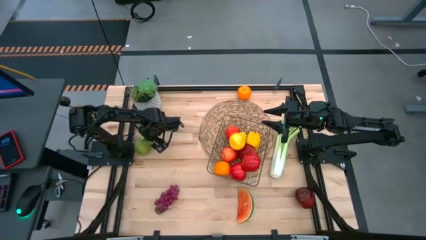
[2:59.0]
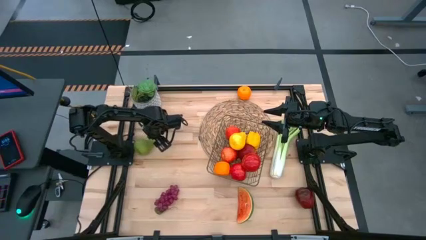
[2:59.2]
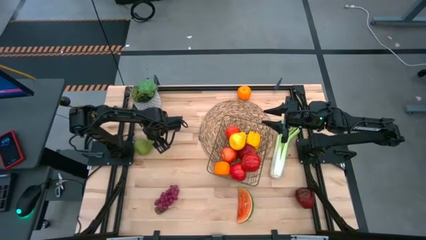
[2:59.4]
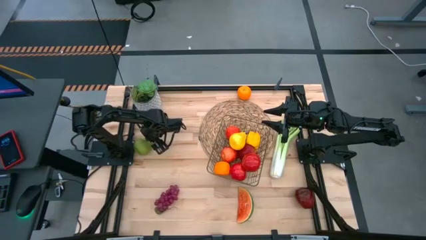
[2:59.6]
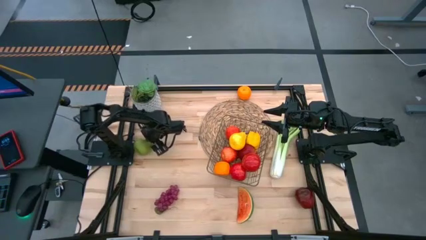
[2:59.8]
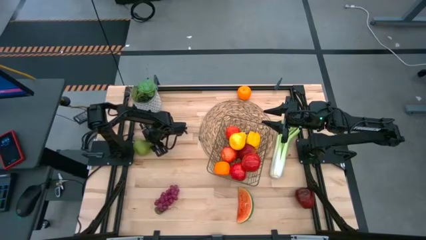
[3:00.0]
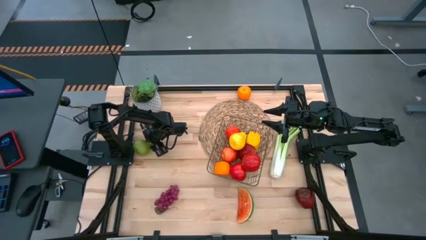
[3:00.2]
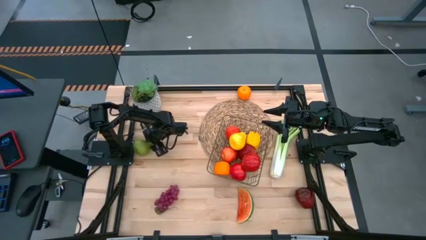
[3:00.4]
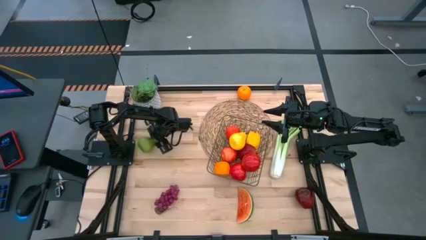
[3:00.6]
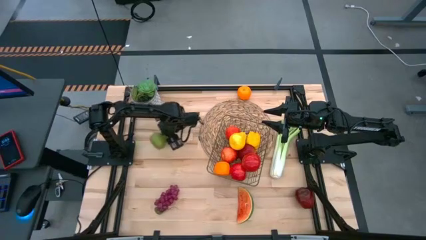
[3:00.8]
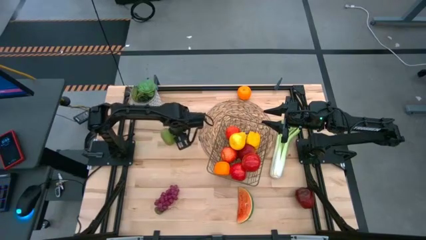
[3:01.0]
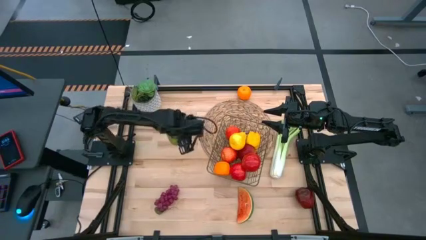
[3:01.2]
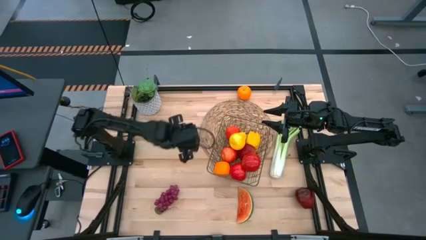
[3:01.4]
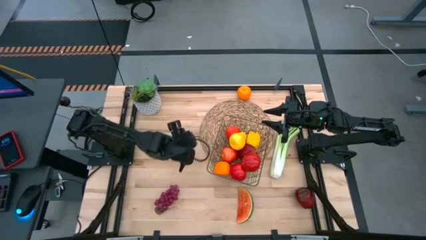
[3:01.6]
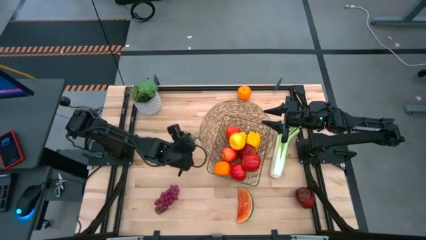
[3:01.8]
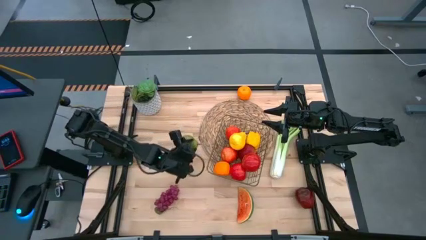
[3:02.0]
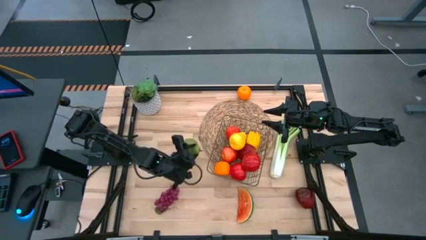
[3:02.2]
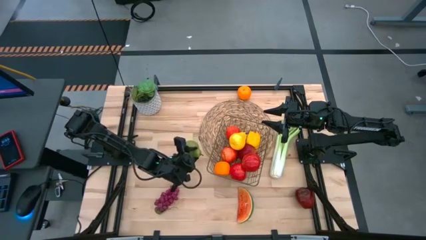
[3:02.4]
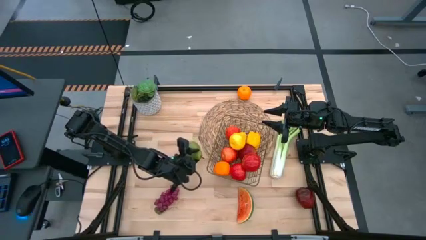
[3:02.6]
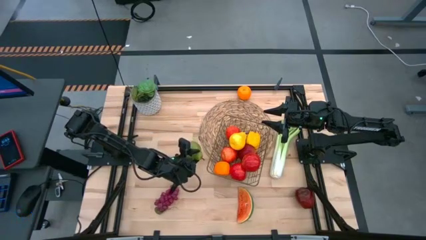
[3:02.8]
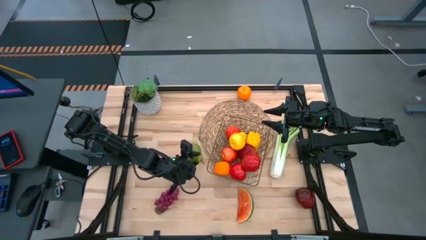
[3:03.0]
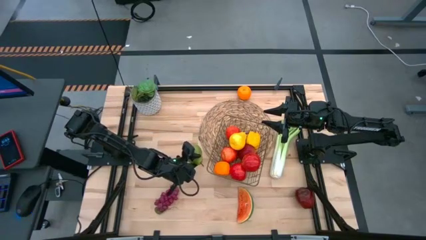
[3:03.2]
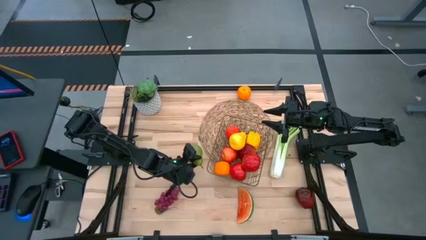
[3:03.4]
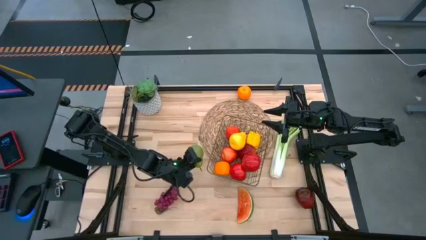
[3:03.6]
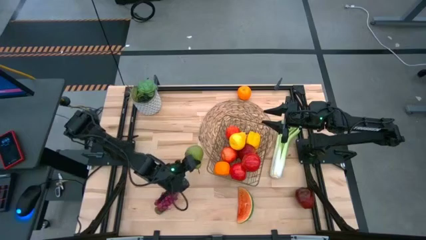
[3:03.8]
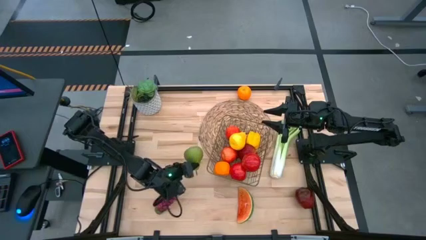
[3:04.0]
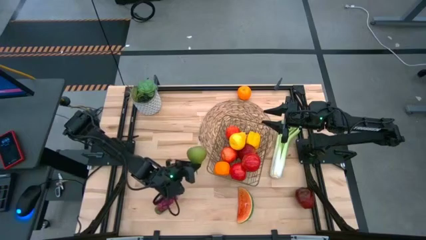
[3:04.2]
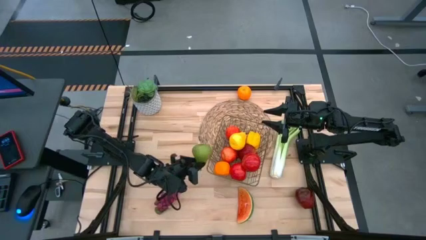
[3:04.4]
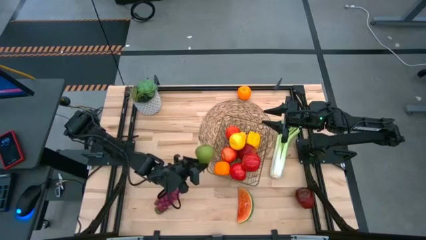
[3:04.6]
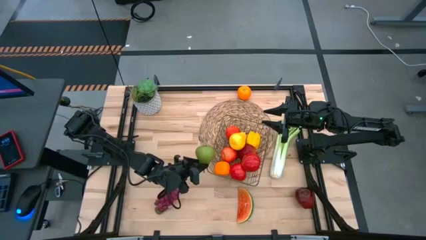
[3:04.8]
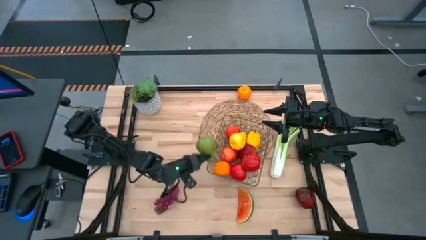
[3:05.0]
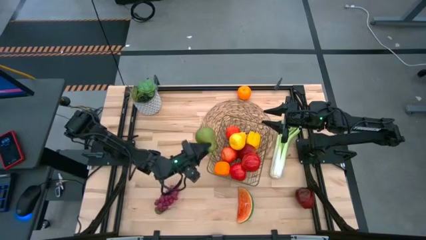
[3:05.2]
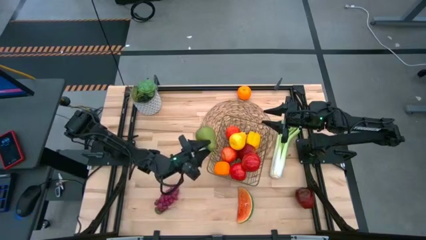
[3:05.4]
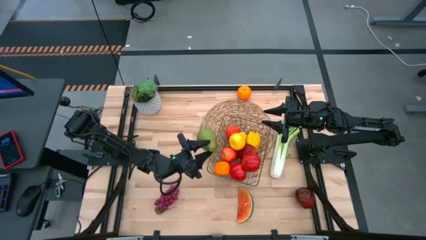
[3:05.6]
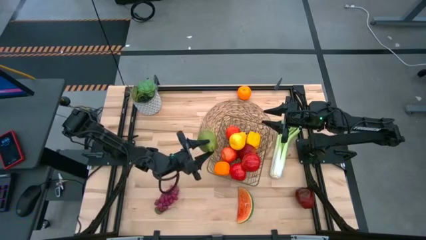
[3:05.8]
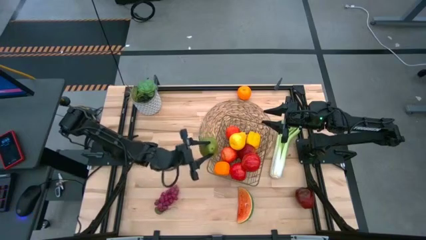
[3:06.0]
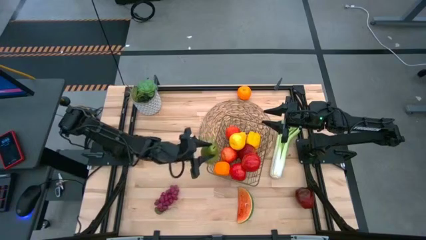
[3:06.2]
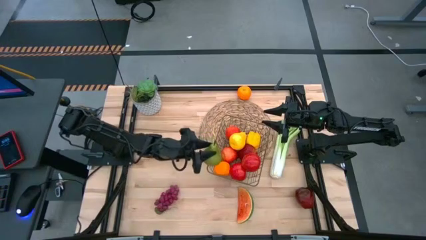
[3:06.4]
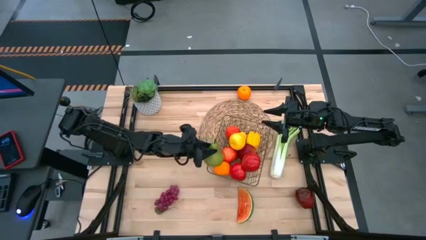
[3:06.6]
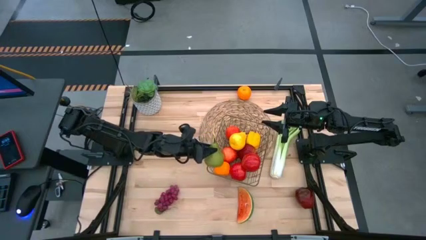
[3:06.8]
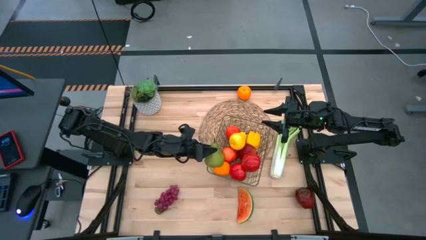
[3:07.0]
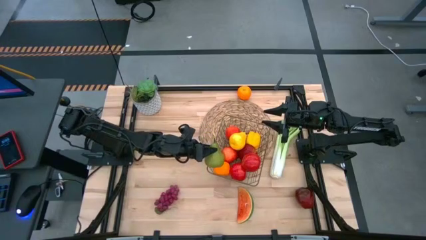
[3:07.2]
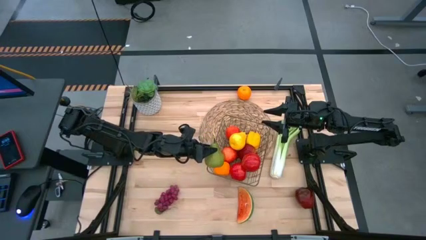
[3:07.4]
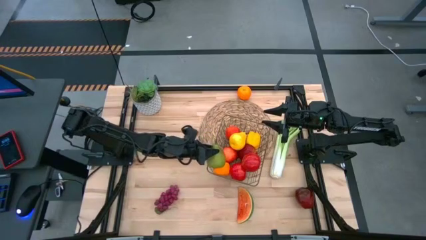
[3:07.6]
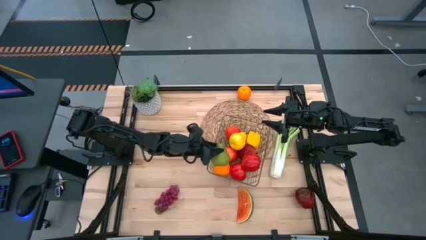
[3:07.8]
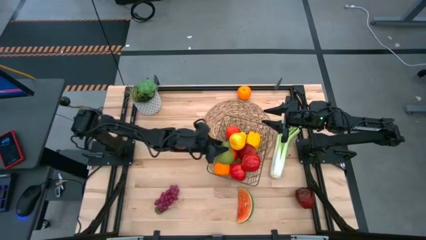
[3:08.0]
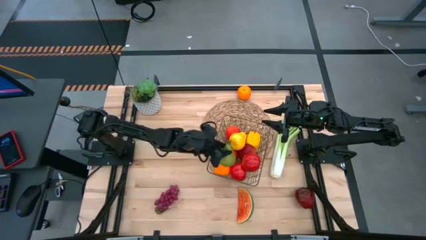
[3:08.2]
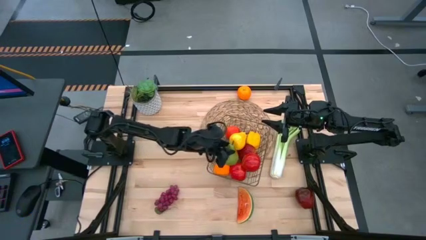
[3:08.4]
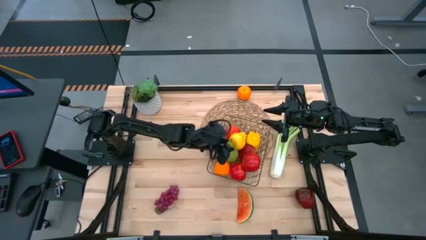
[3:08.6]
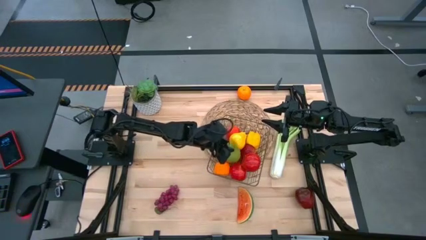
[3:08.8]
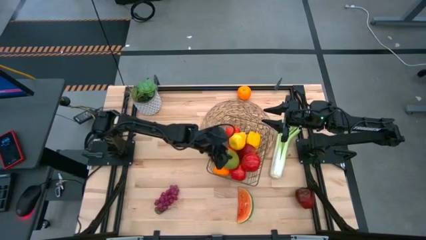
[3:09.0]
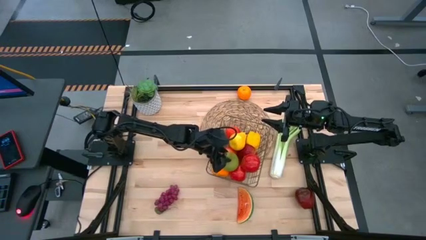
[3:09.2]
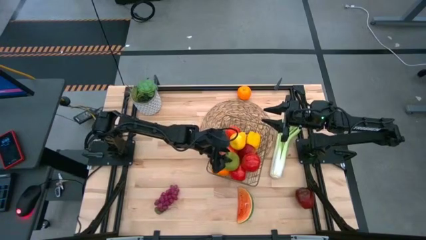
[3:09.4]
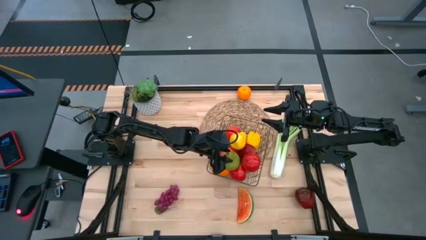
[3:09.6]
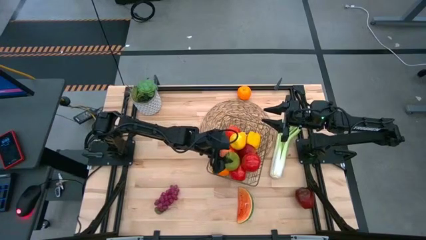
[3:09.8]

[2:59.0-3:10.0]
Task: Build produce basket
Put the green pear into the wire basket

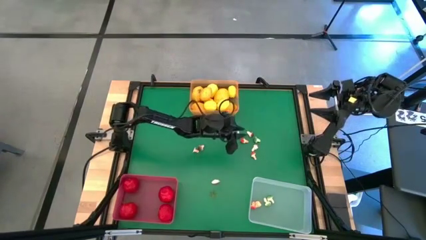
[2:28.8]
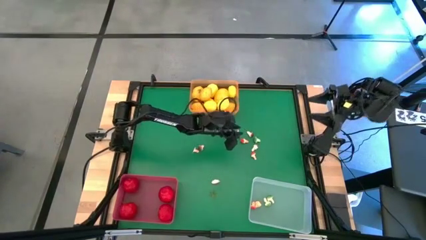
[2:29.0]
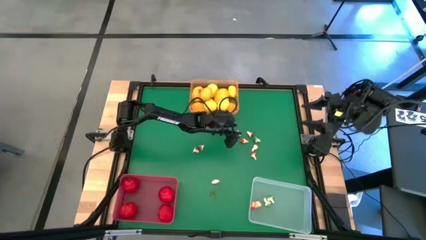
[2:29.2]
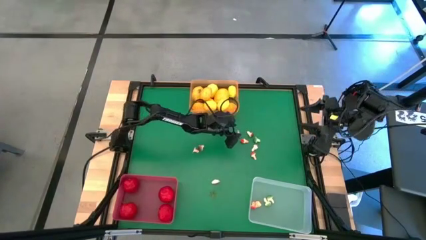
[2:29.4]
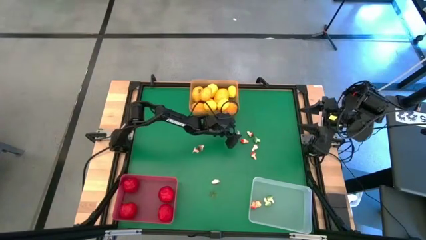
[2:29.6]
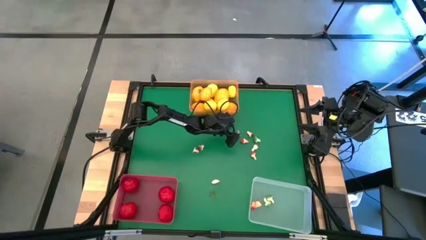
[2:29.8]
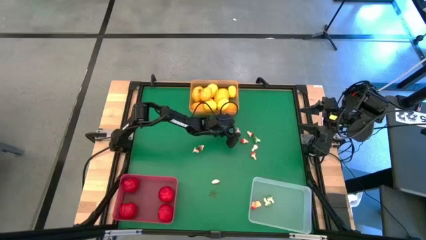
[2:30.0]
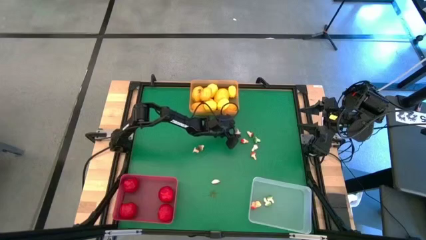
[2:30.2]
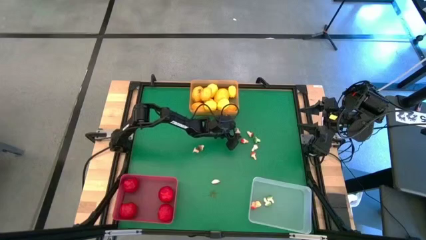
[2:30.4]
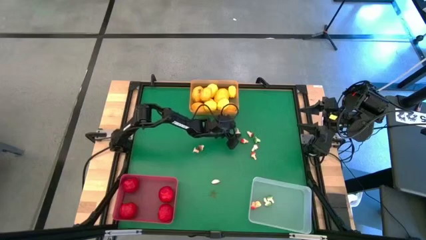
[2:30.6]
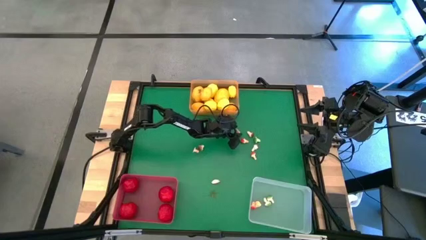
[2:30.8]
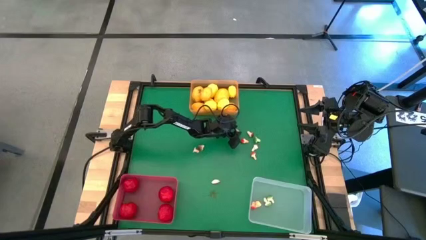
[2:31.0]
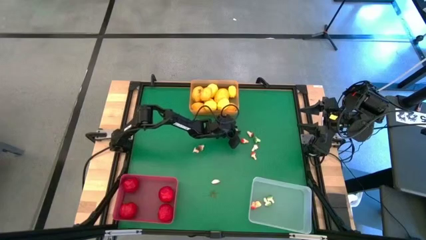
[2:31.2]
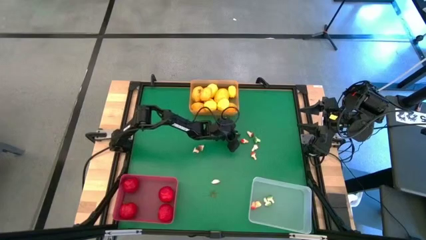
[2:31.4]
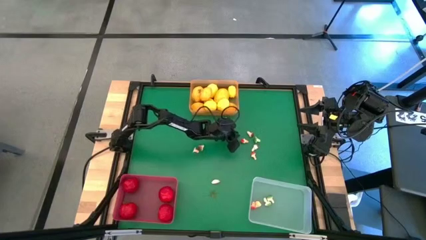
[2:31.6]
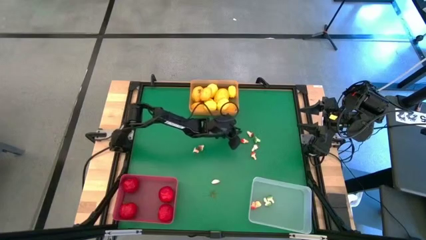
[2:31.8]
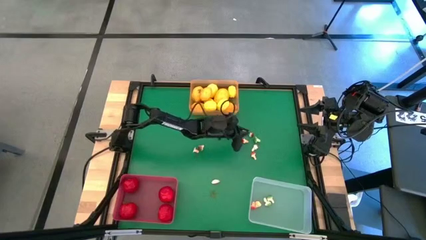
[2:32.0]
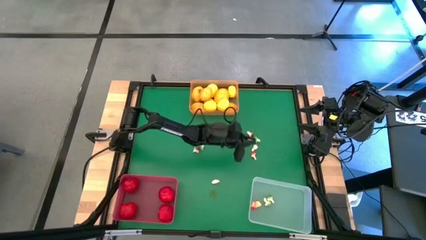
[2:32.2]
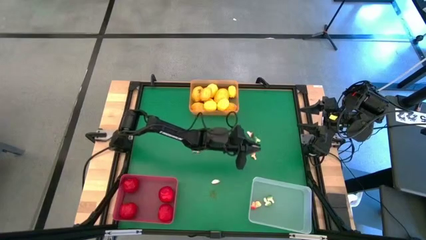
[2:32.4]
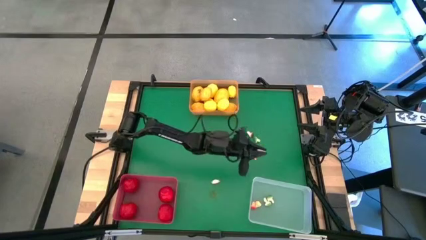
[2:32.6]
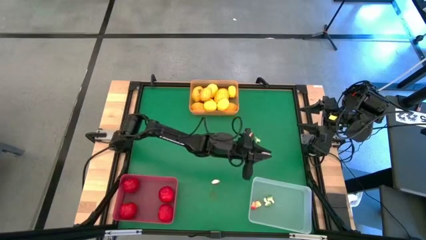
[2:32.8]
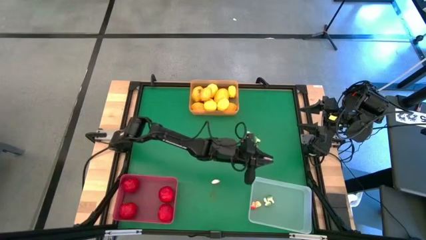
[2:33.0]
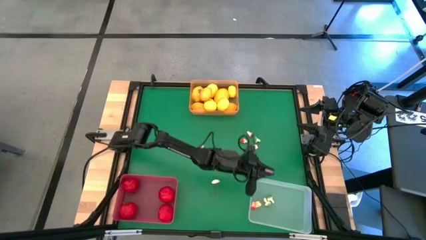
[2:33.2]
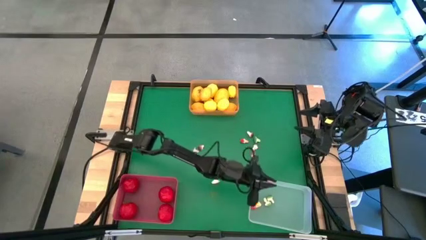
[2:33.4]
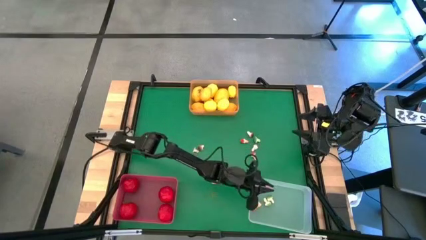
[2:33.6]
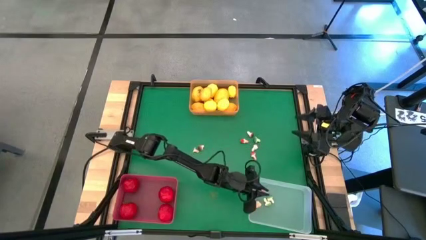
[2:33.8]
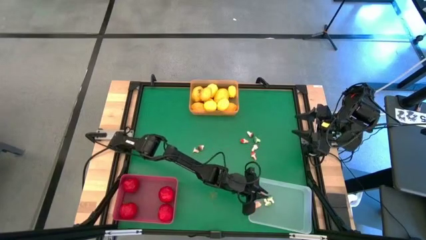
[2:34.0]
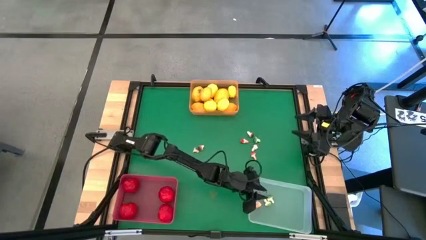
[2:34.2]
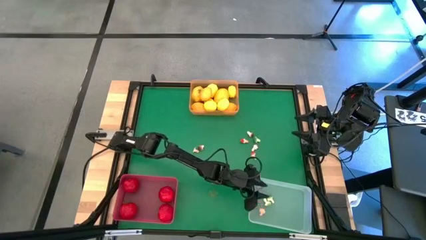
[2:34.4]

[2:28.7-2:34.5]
Task: Sort produce into baskets
Put the brown mushroom into the transparent bin
